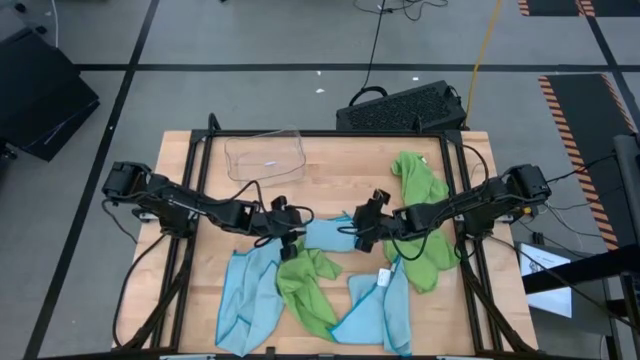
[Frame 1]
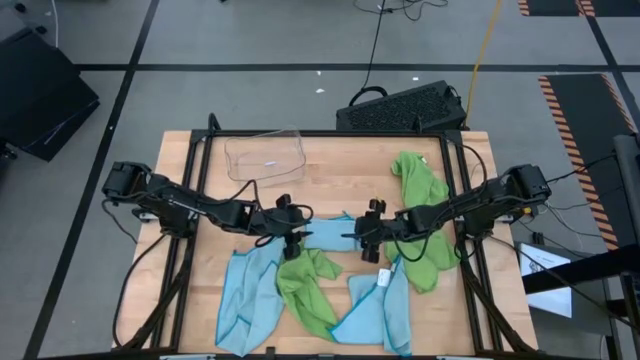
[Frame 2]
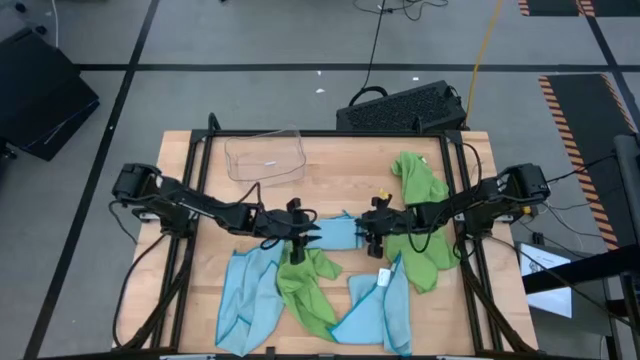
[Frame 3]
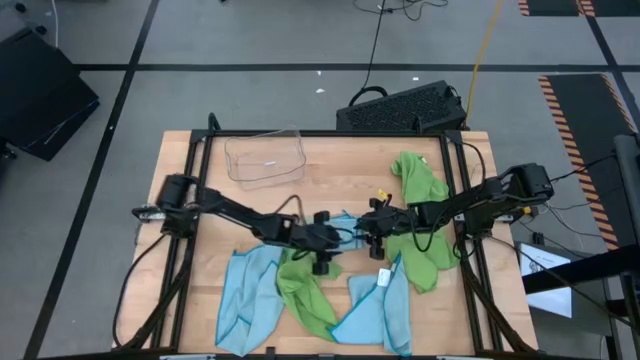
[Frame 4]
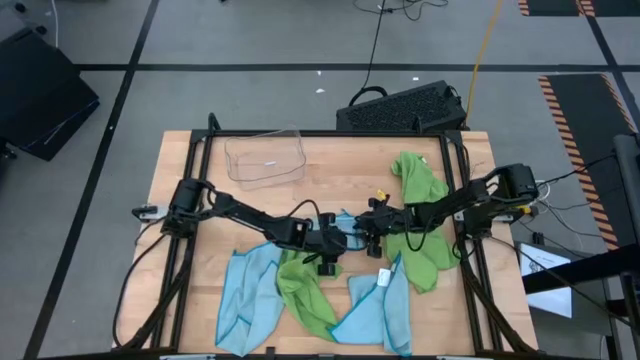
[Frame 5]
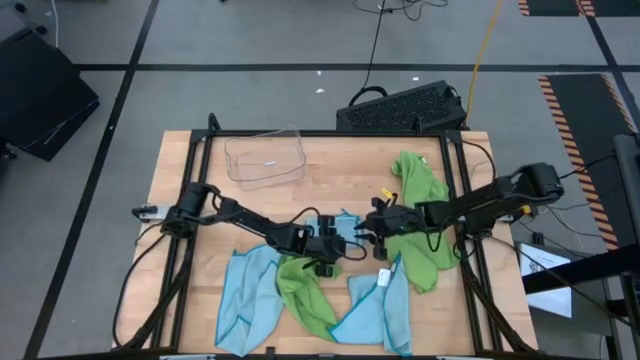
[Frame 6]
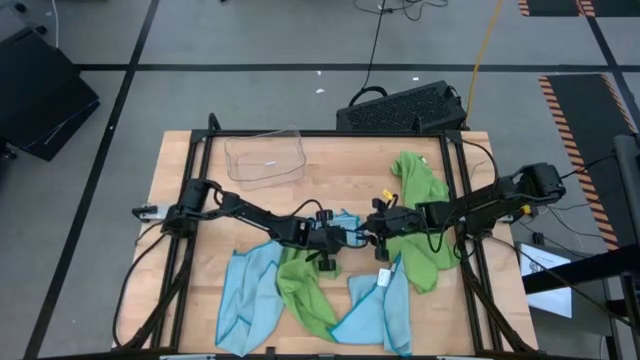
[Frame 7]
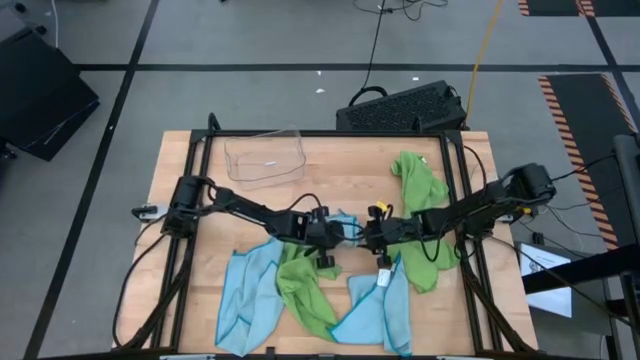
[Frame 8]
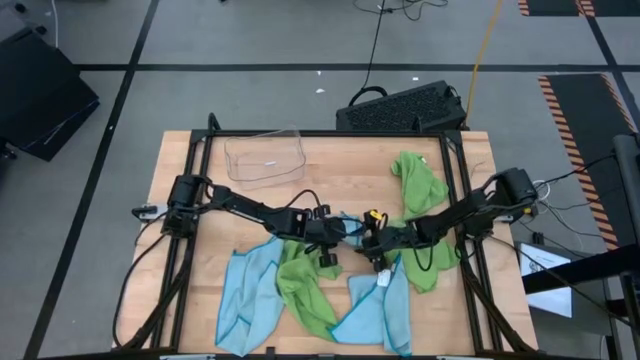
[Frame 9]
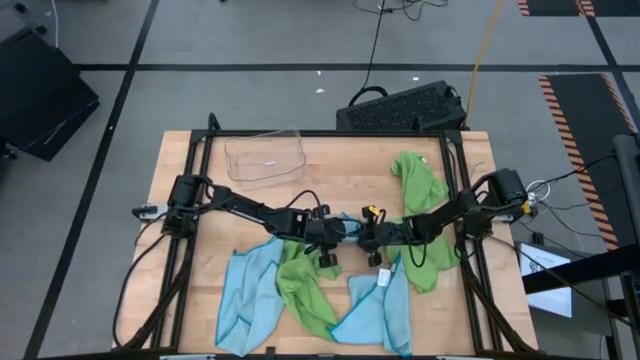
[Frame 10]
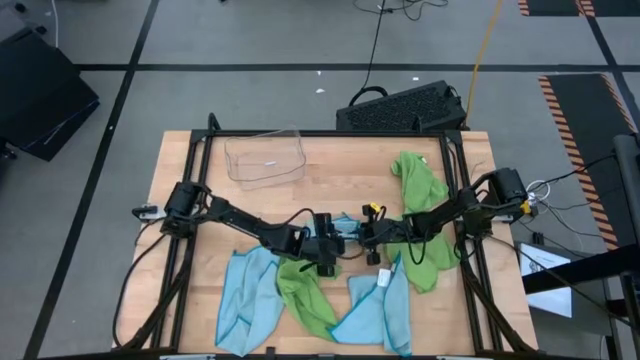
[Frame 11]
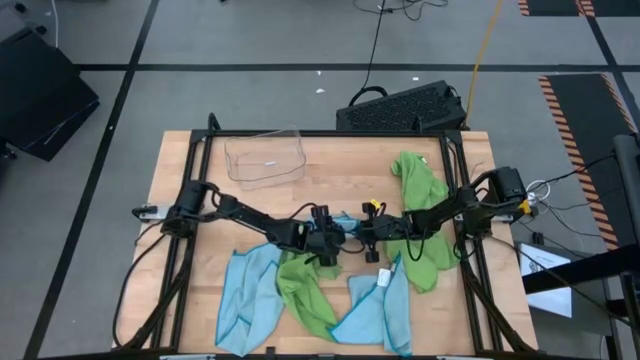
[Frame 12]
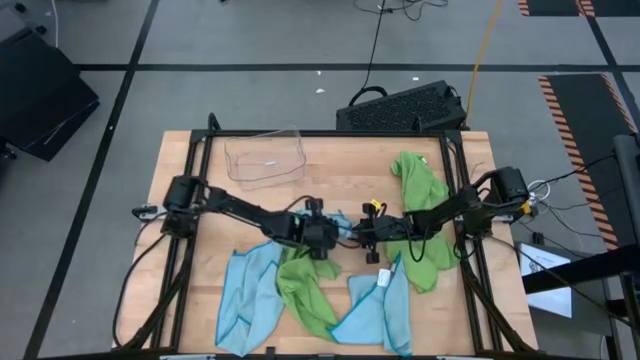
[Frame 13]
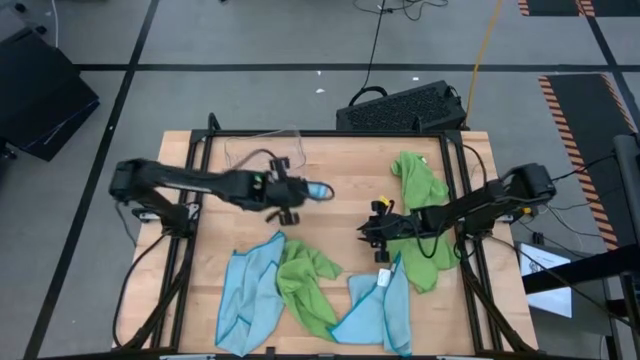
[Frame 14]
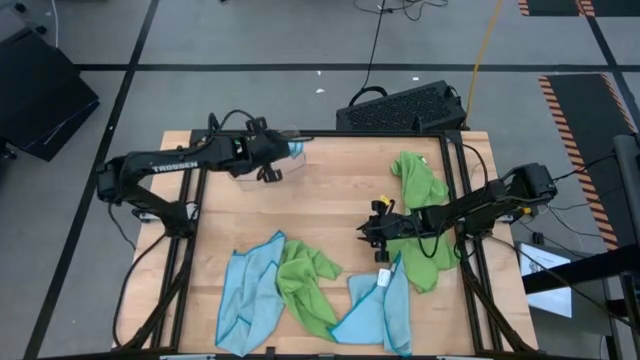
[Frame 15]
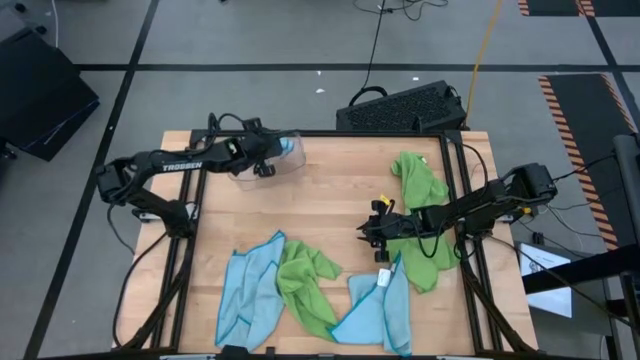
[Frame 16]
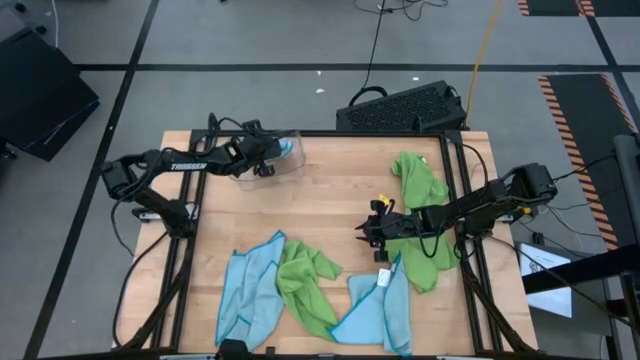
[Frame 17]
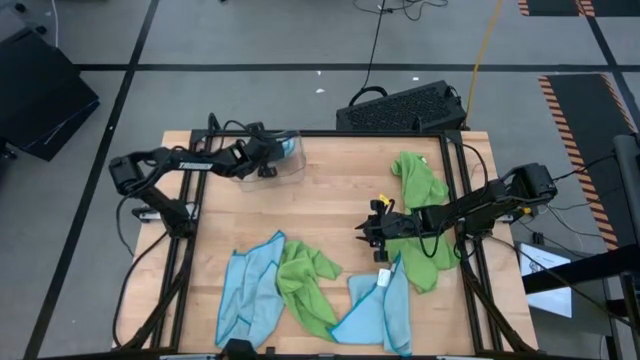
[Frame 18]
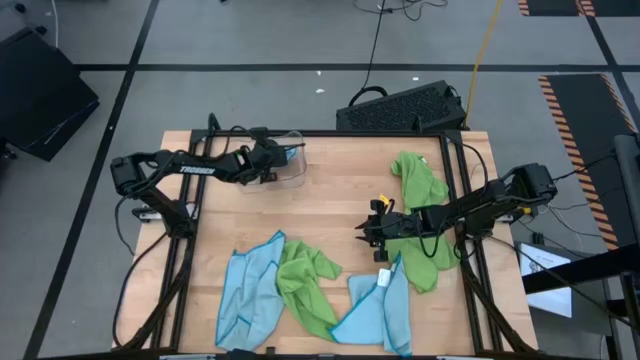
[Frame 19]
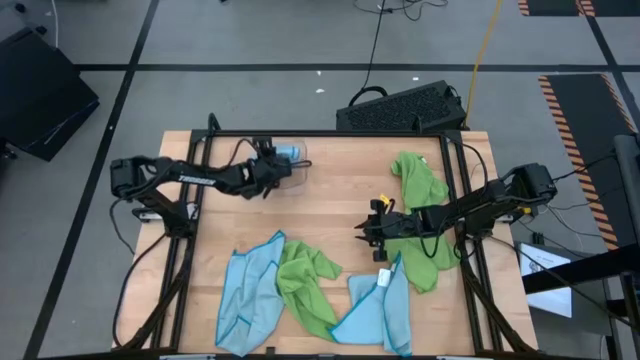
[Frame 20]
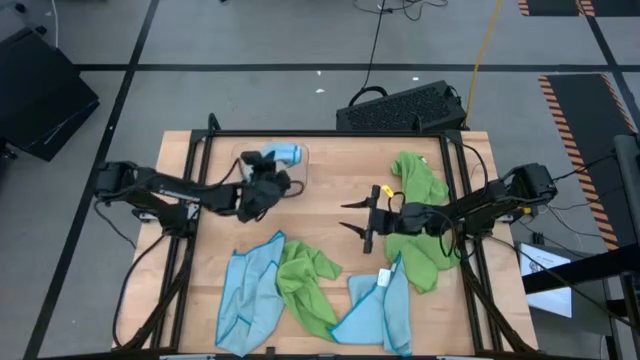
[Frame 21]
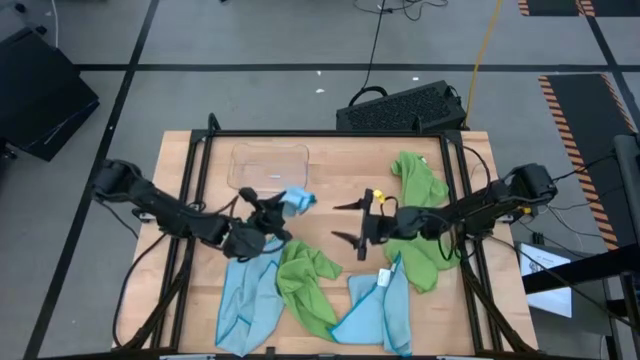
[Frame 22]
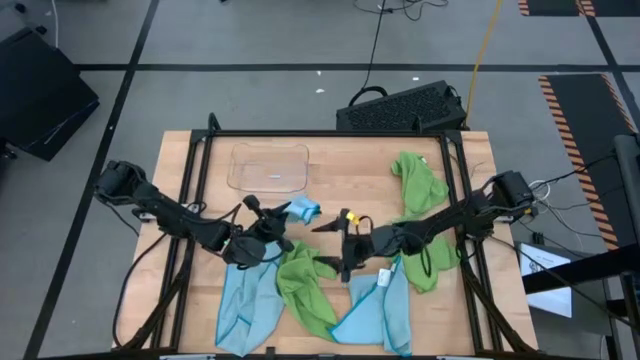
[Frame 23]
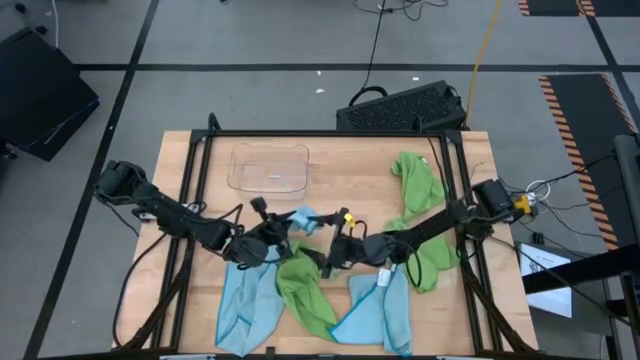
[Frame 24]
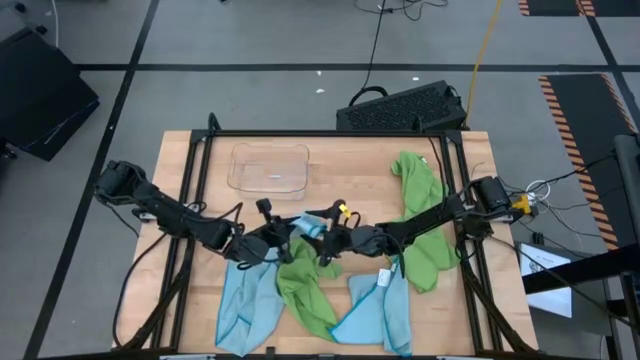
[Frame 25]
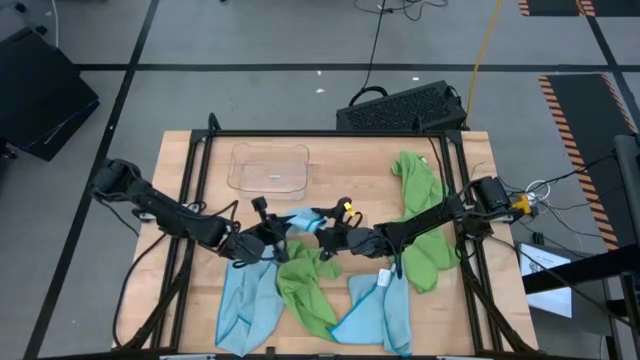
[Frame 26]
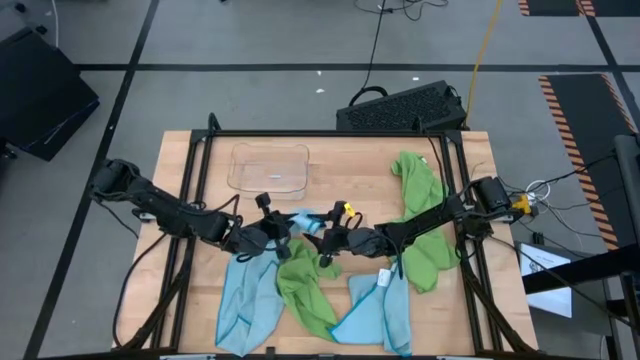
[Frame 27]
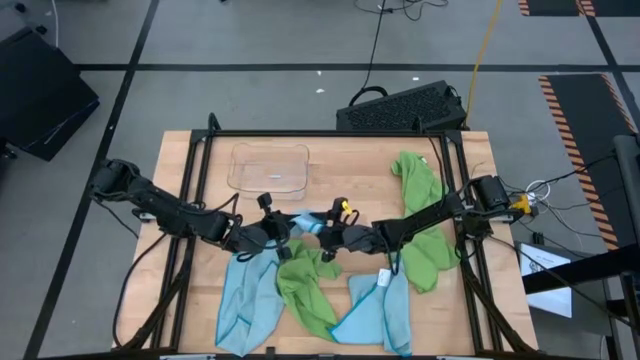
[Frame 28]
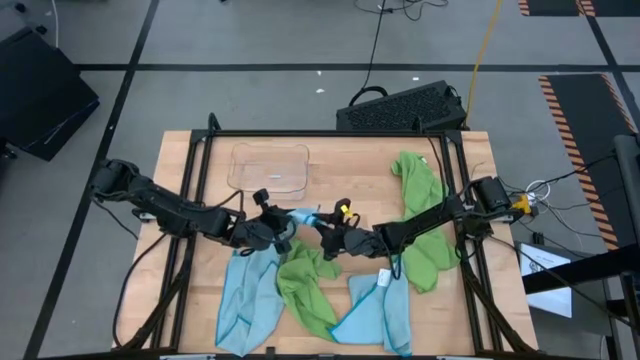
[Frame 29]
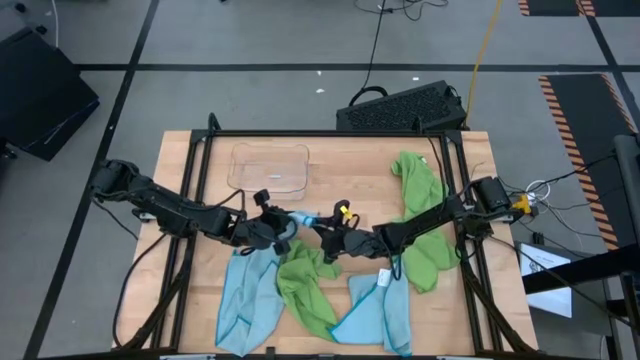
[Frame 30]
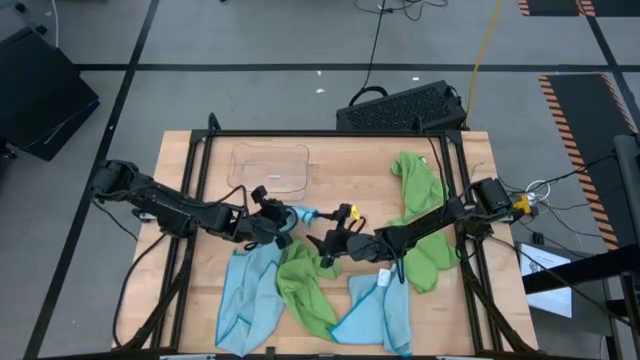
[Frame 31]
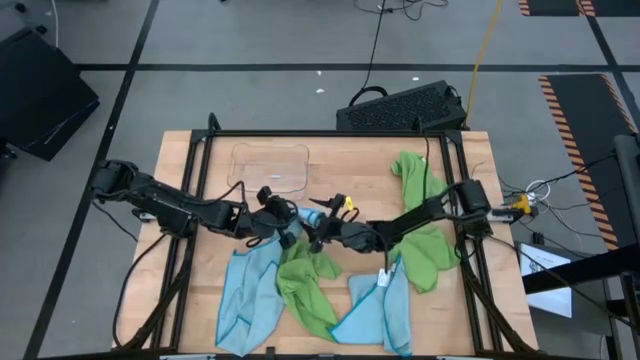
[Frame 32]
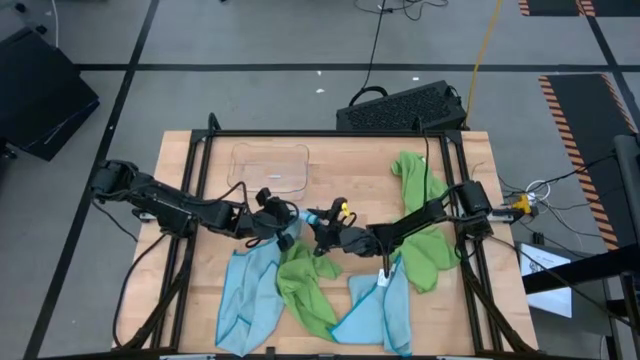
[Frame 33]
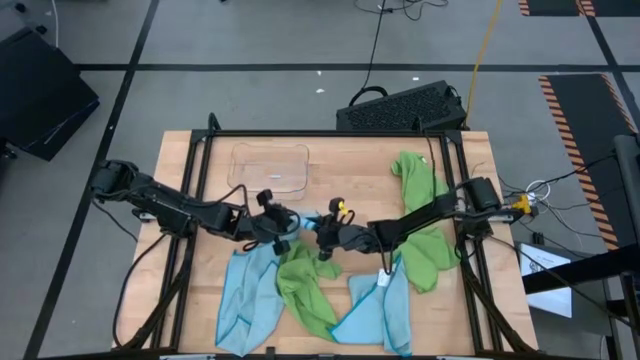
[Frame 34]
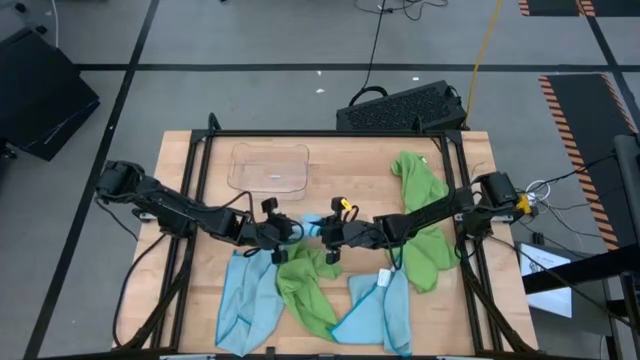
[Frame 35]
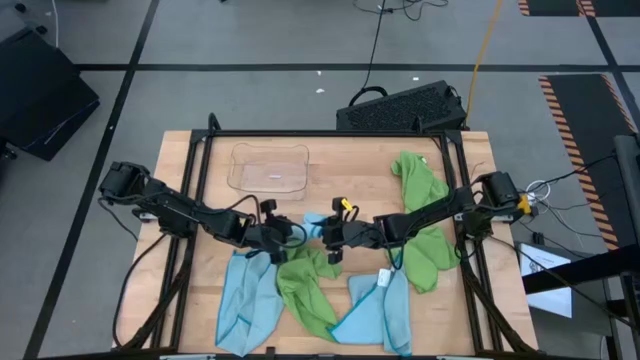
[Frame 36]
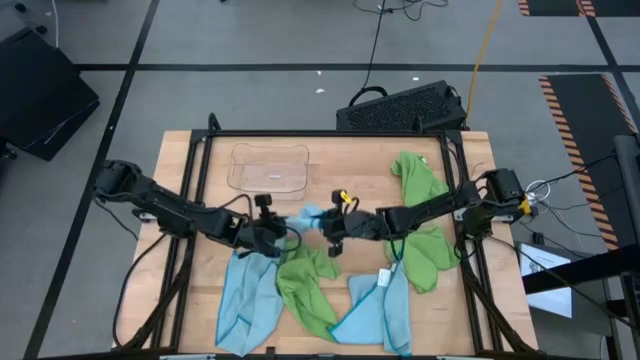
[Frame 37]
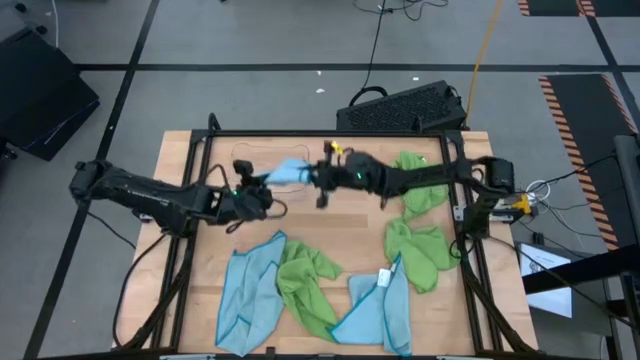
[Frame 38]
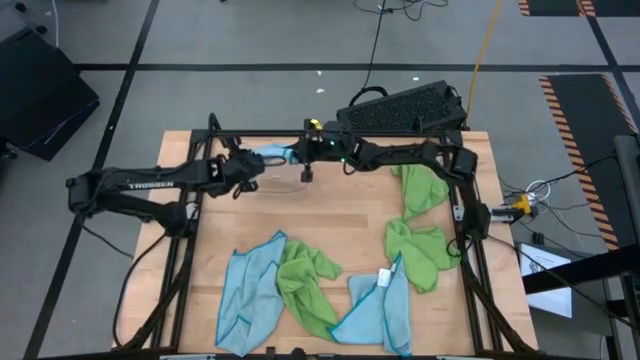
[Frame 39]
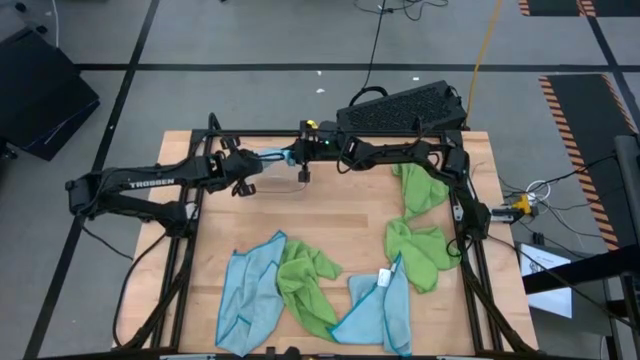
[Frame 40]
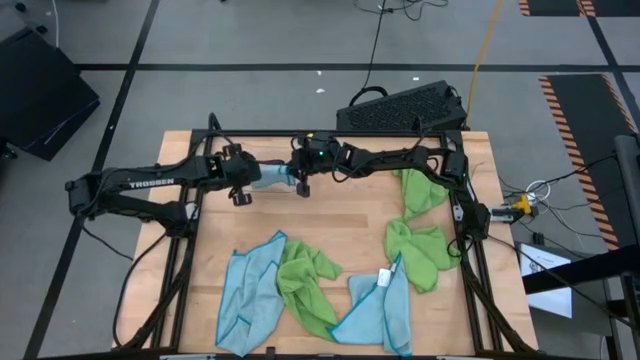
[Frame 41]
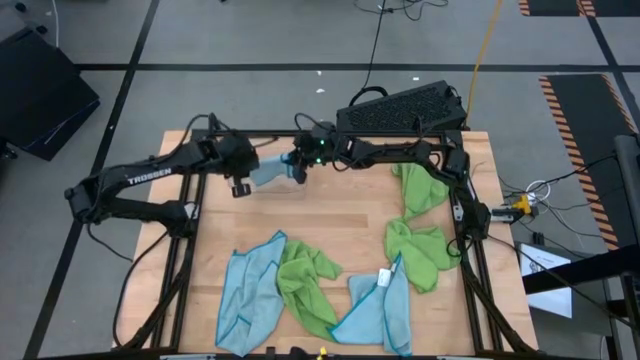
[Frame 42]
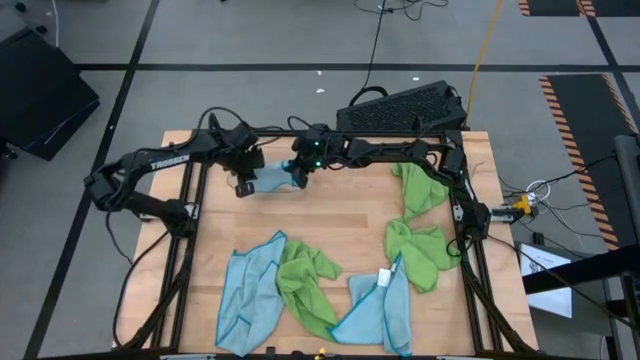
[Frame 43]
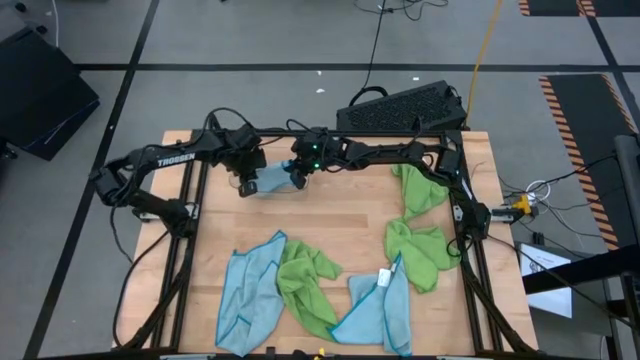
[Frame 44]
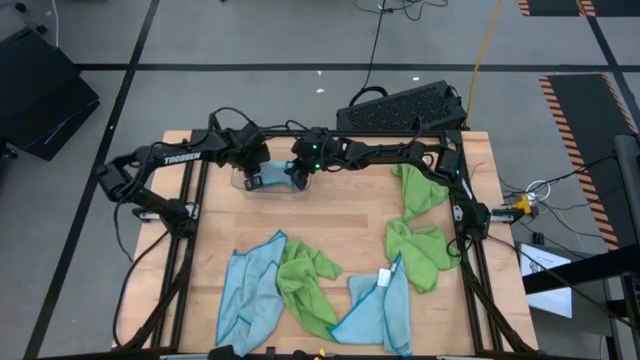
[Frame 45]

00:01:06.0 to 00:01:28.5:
Task: Fold microfiber towels
Put the top center blue microfiber cloth into the bin
